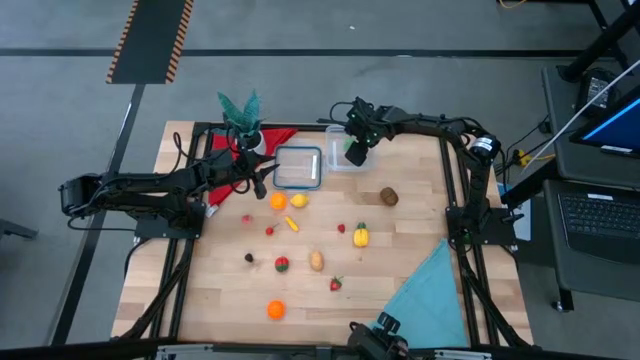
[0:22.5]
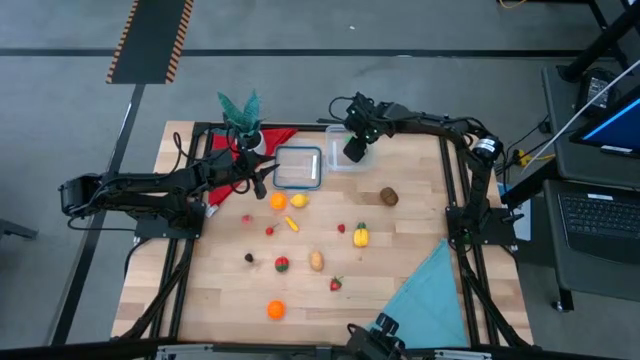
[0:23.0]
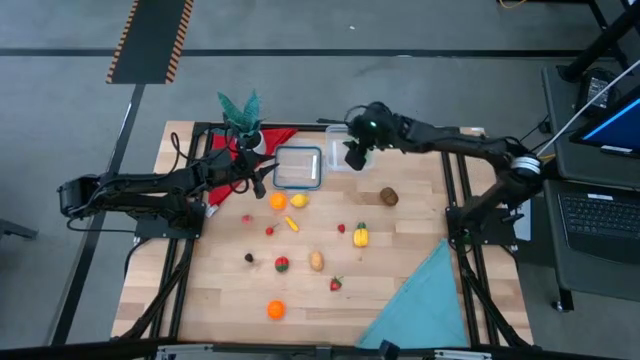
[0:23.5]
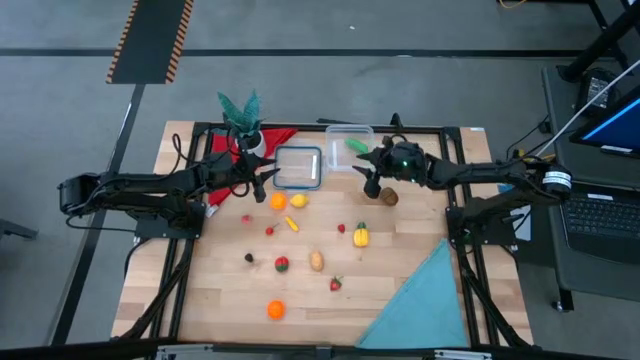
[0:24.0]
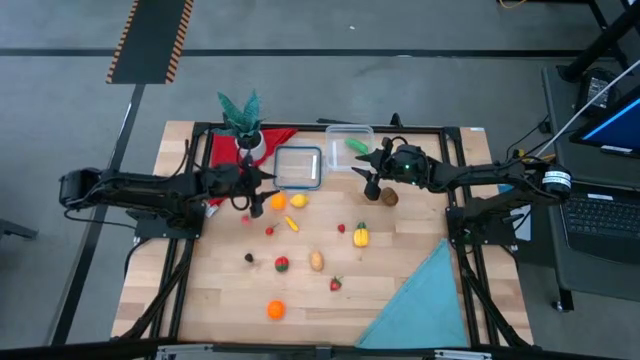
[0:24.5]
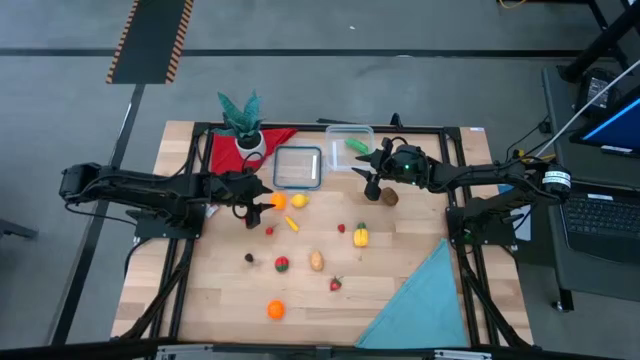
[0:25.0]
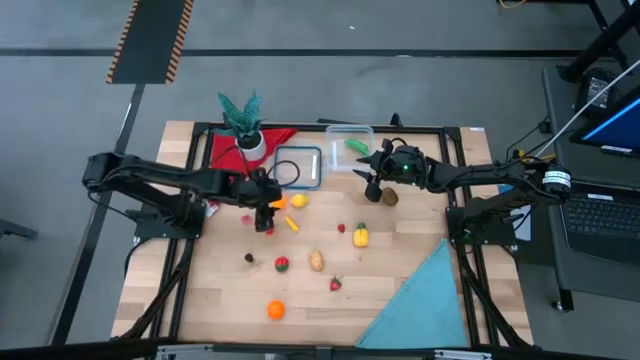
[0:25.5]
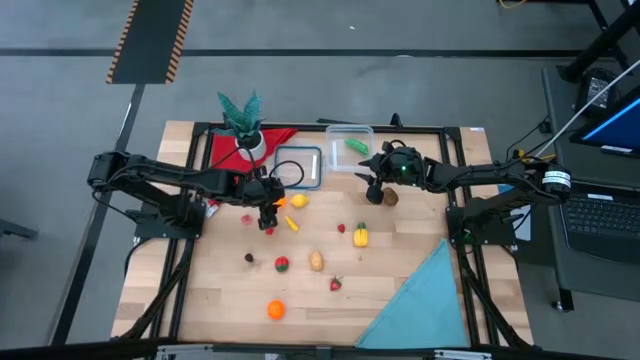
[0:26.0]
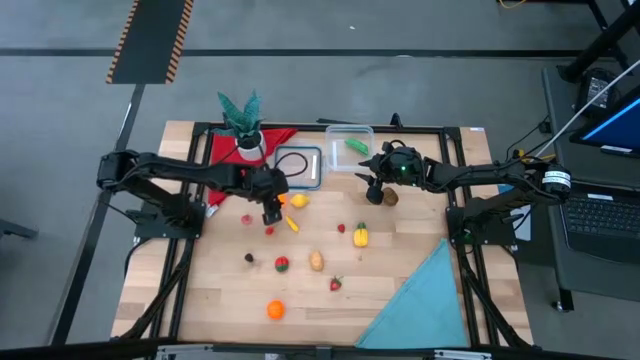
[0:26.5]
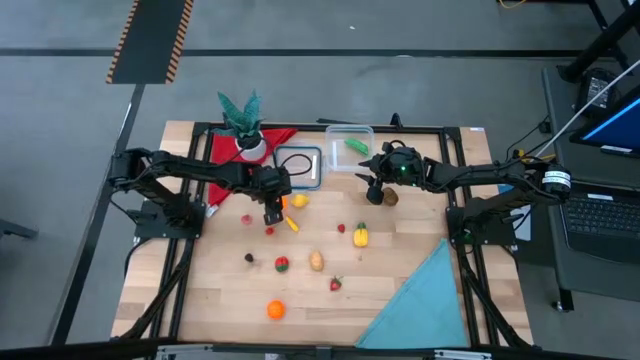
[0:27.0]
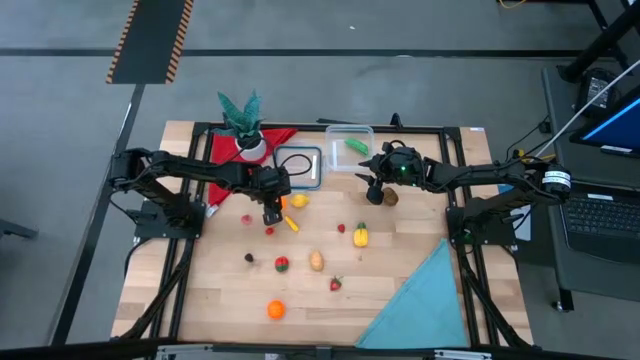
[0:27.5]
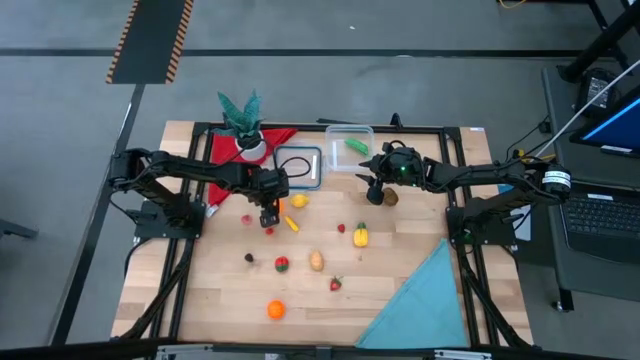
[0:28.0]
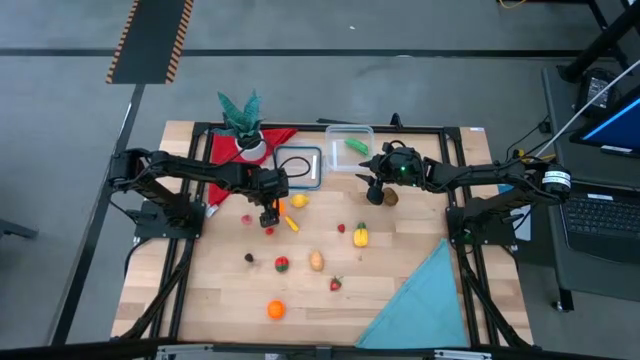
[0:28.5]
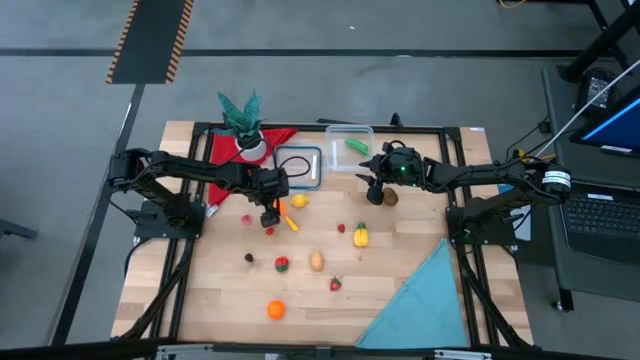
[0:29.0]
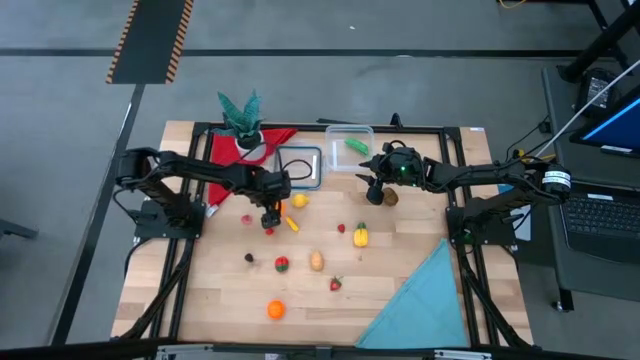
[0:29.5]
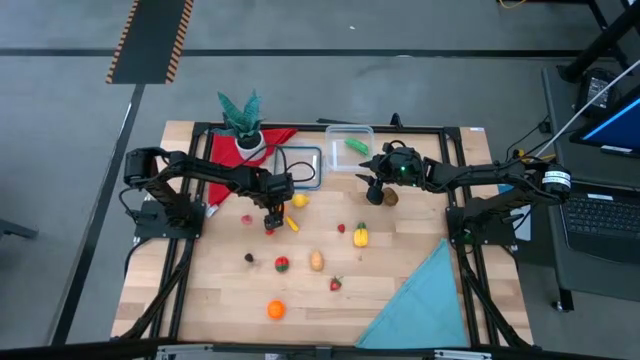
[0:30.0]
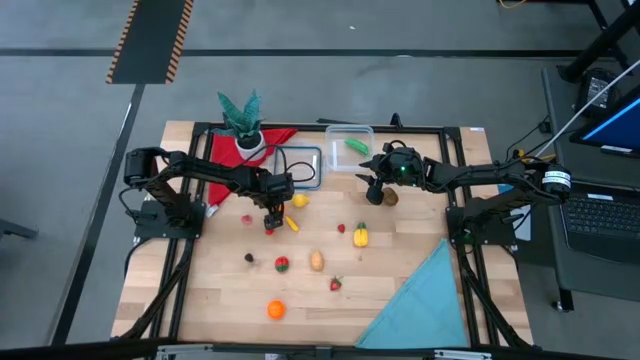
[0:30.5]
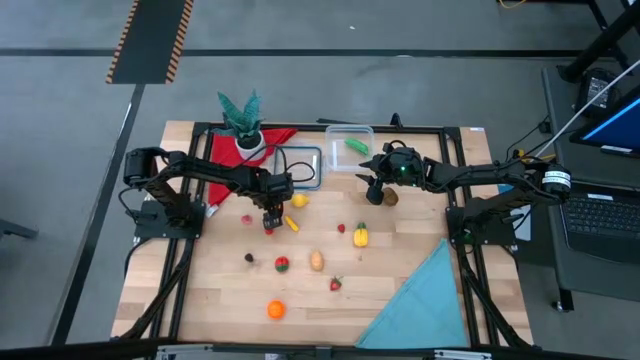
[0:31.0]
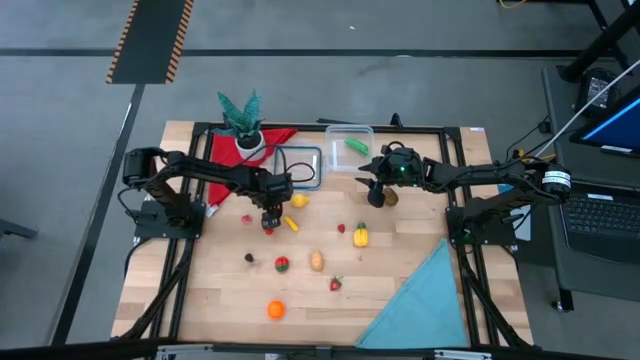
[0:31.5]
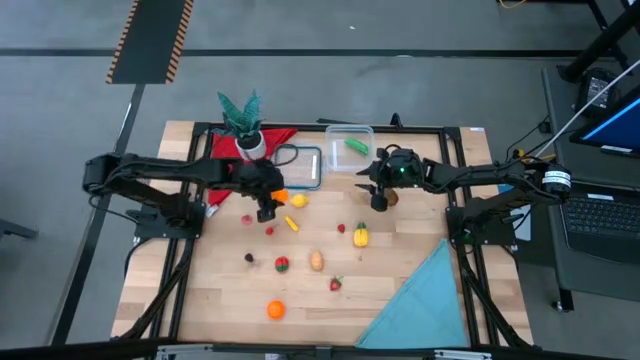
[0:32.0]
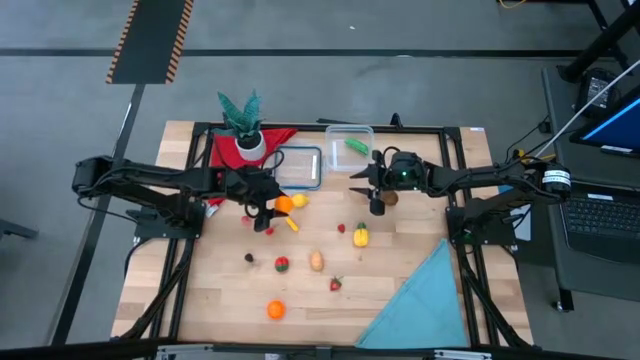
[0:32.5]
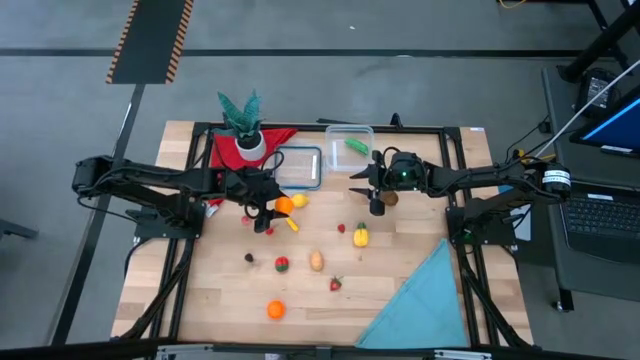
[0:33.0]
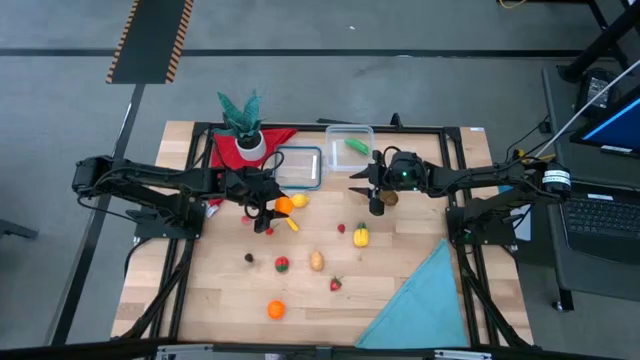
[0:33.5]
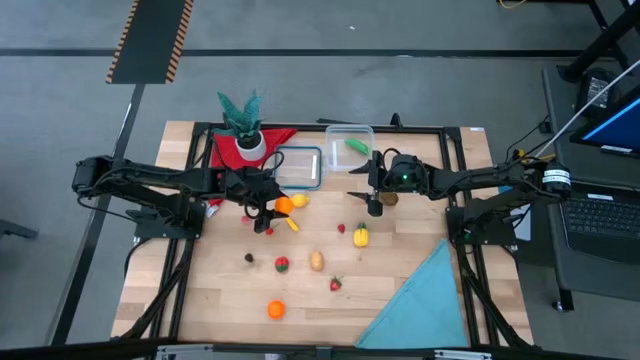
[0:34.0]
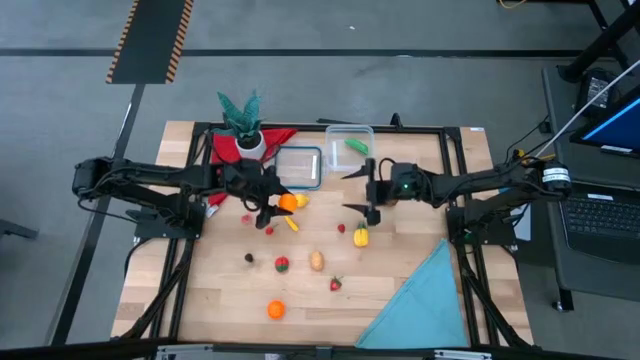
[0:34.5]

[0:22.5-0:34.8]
Task: Pick and placing Produce into tupperware
Put the orange into the transparent bin

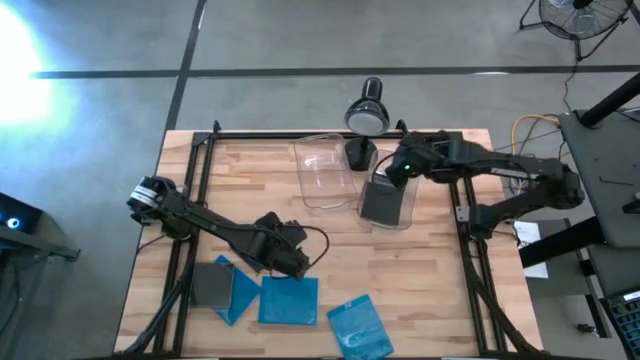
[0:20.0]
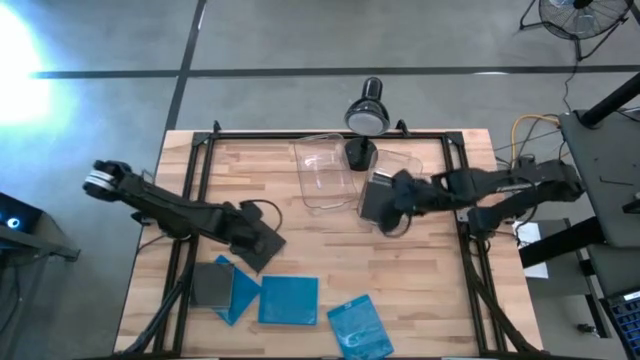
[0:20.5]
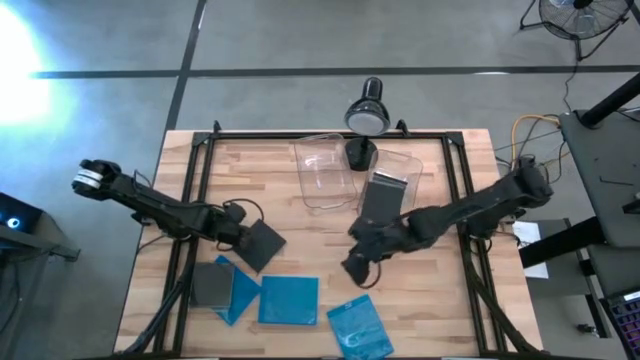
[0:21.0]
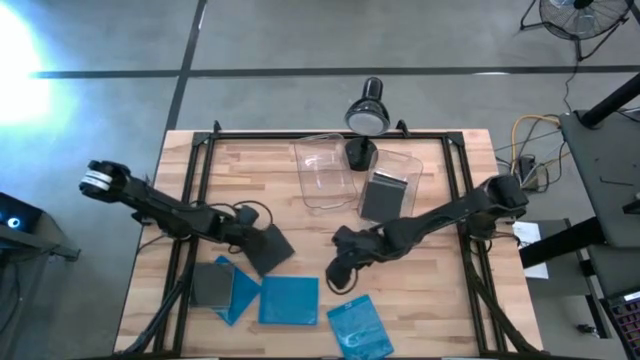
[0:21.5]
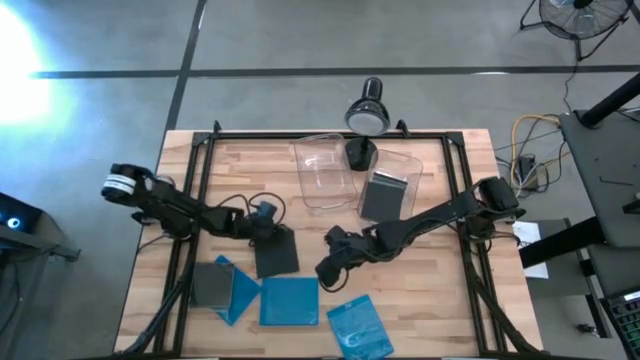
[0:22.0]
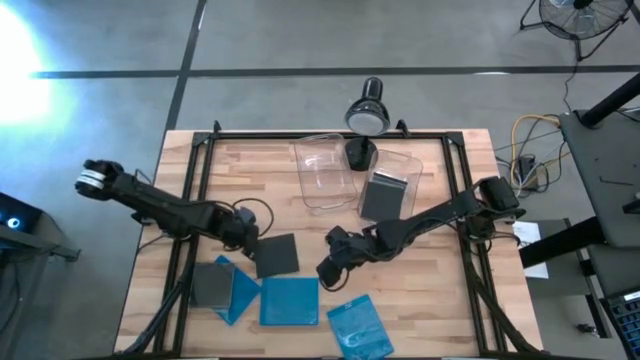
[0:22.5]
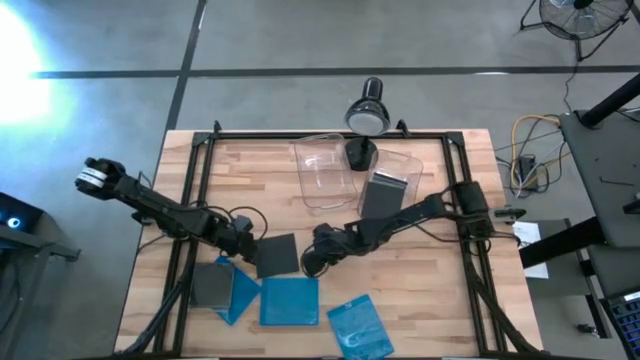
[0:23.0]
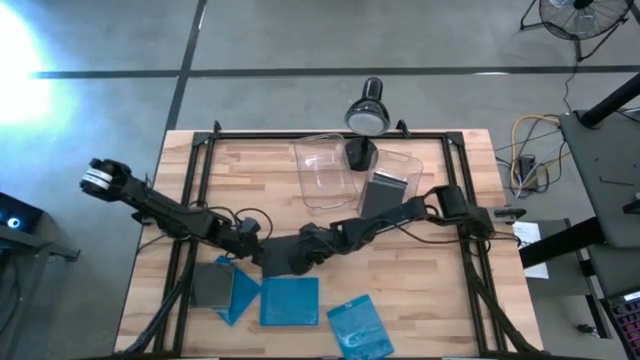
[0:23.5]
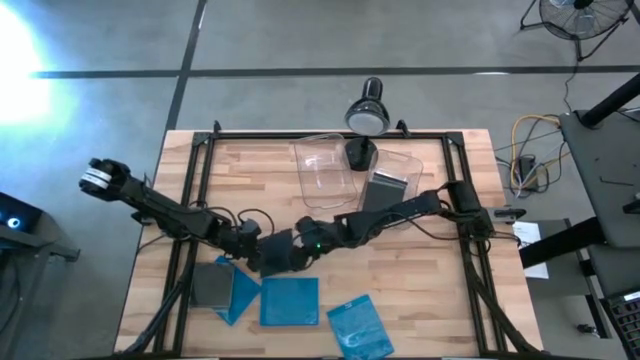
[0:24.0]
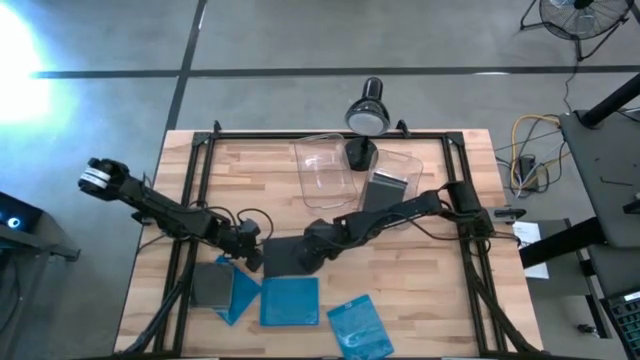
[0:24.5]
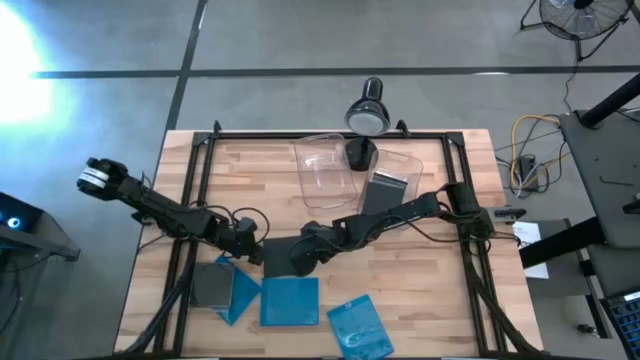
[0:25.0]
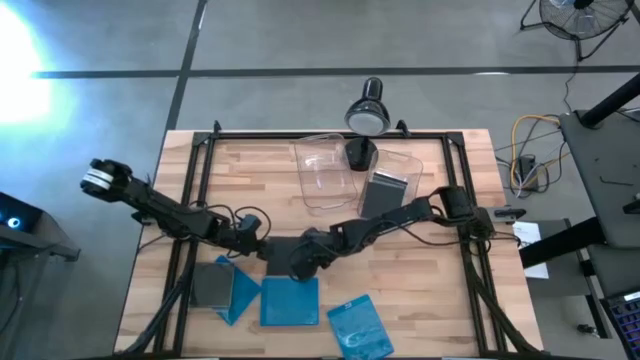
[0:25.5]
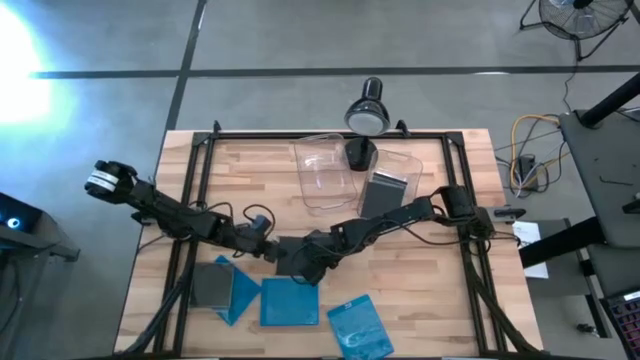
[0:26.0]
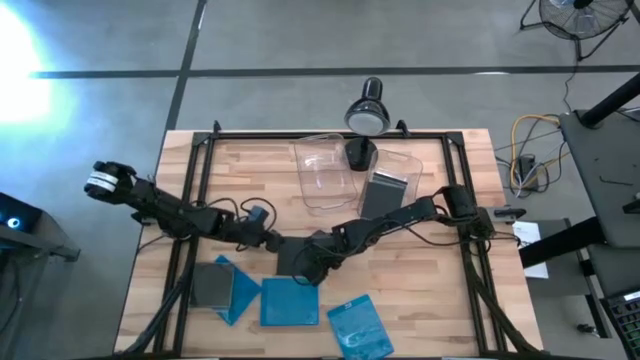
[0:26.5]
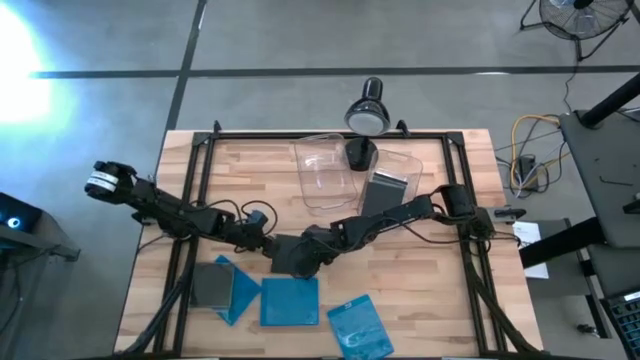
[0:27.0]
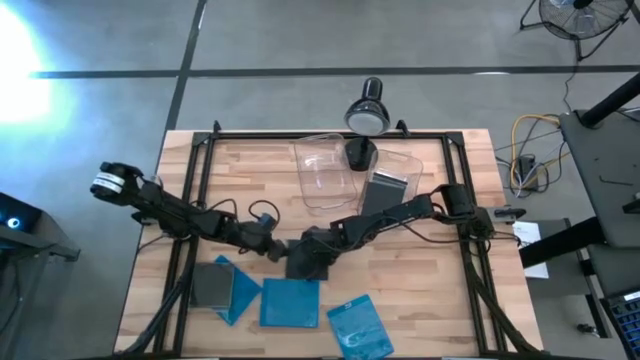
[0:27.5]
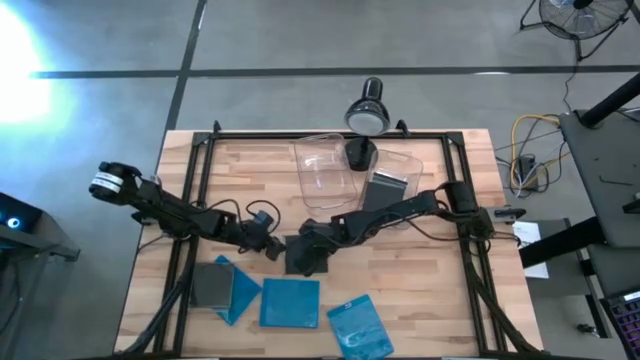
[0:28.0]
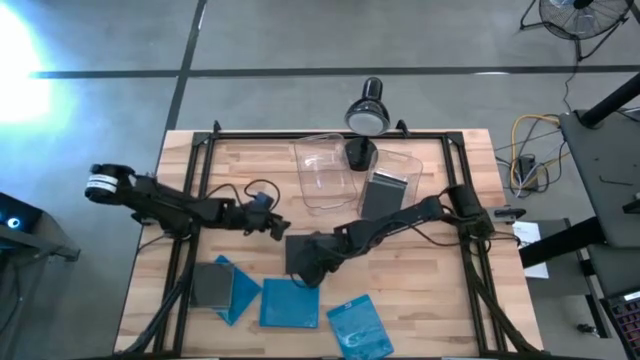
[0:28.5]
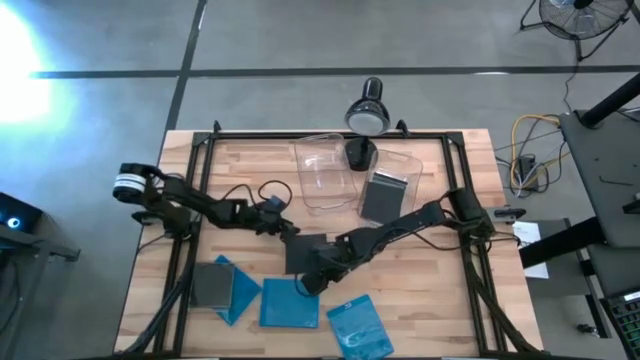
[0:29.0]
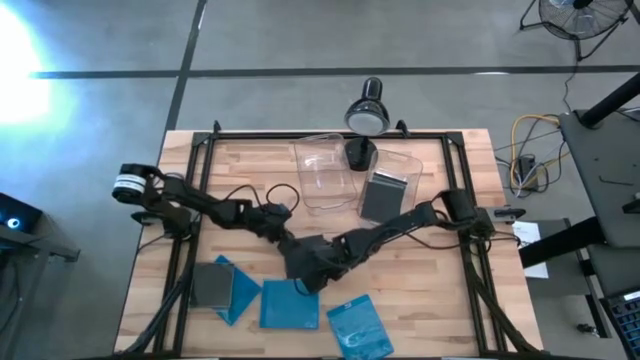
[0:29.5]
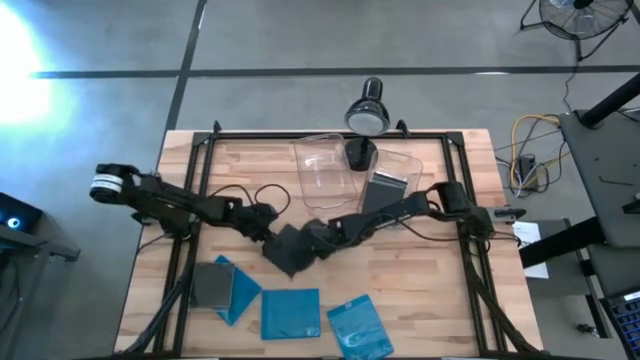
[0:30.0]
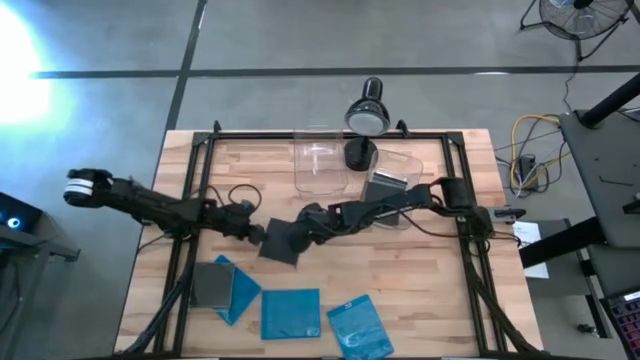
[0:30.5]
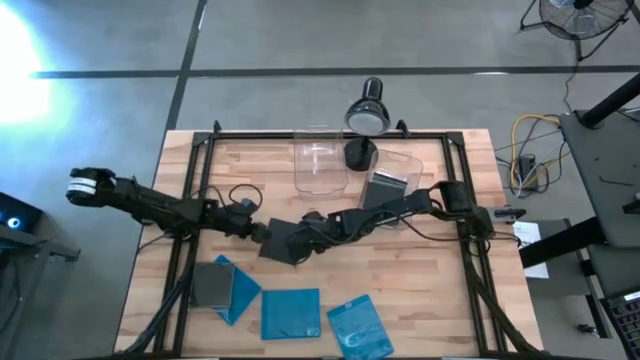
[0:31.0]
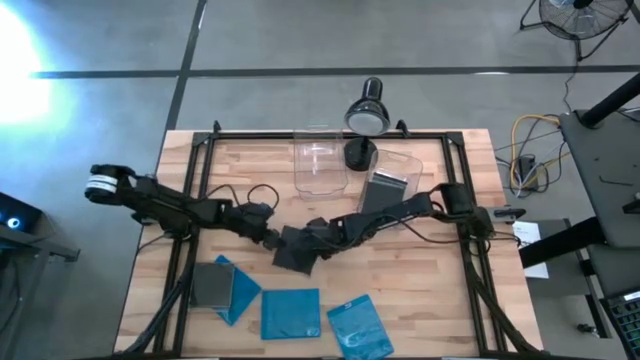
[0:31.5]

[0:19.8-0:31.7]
Task: Pick & place jewel cases by type
Put the black CD case into the right transparent bin
